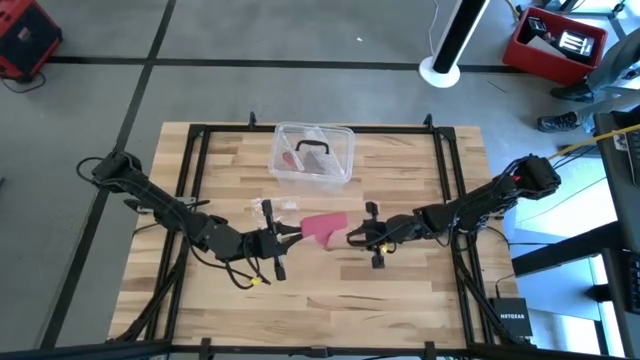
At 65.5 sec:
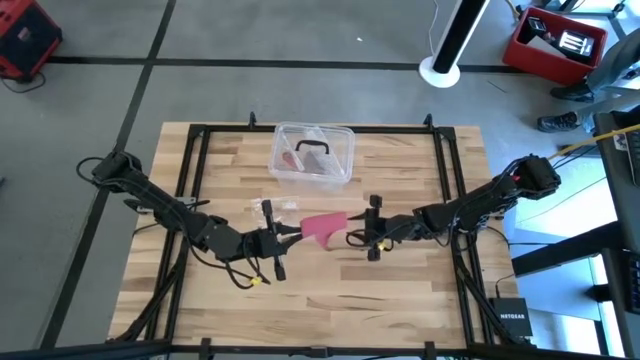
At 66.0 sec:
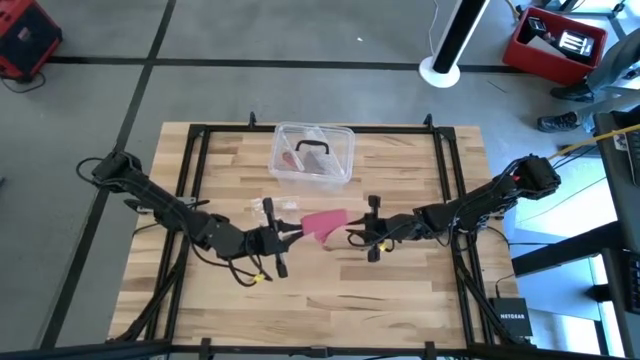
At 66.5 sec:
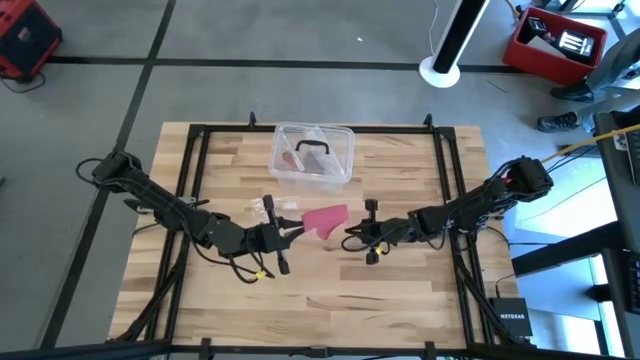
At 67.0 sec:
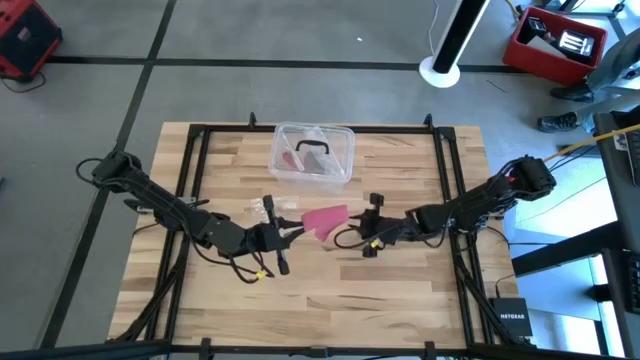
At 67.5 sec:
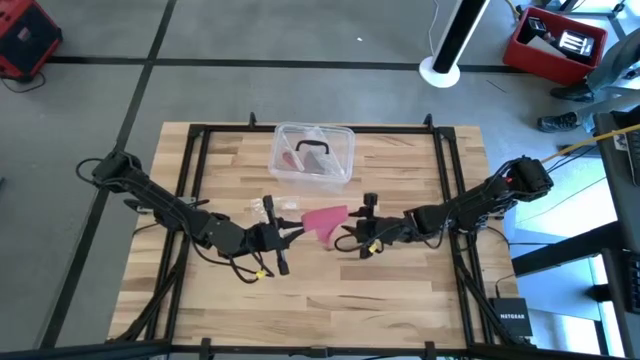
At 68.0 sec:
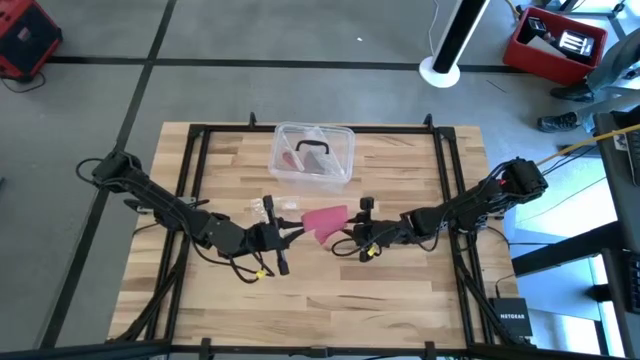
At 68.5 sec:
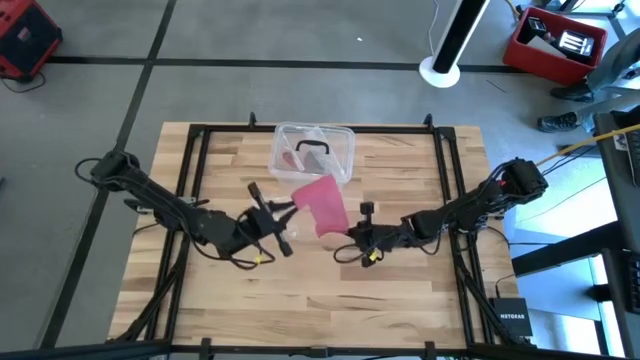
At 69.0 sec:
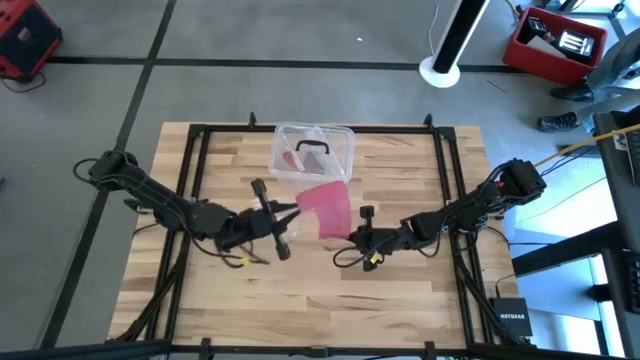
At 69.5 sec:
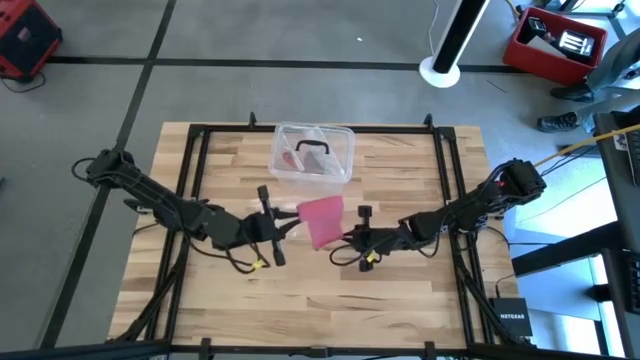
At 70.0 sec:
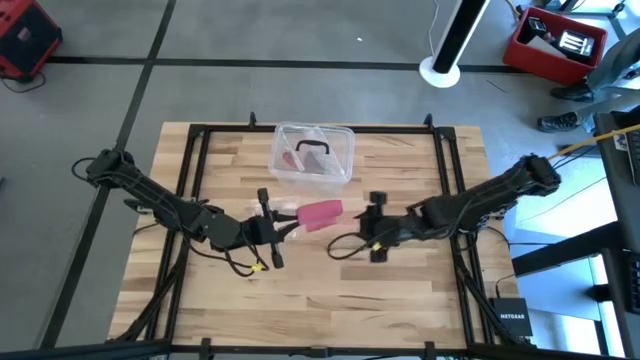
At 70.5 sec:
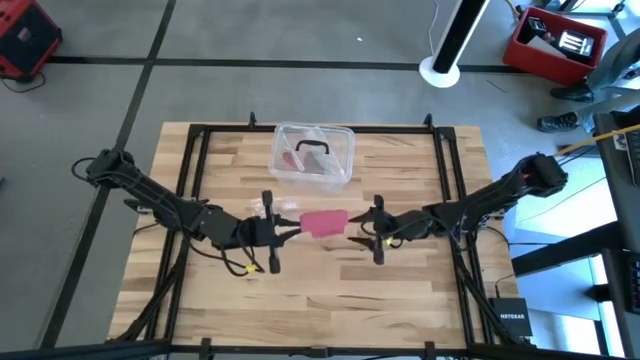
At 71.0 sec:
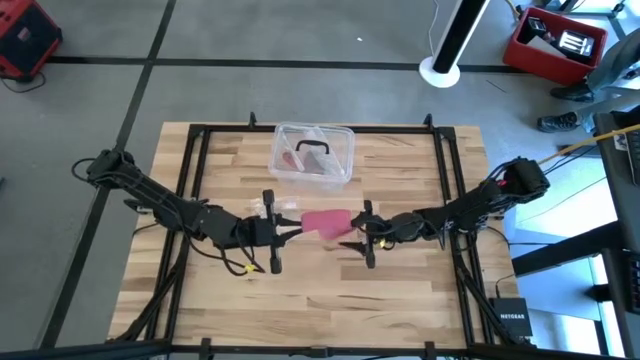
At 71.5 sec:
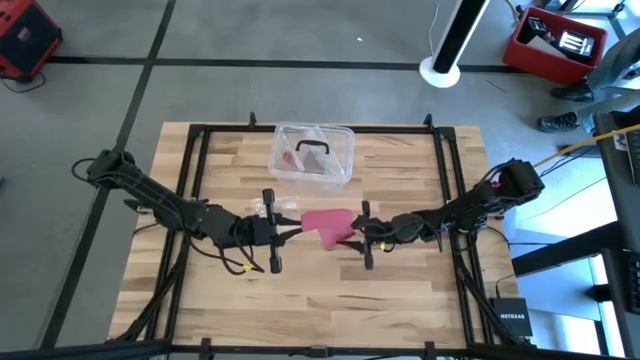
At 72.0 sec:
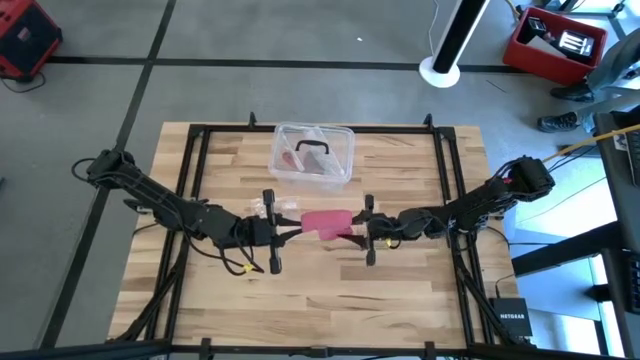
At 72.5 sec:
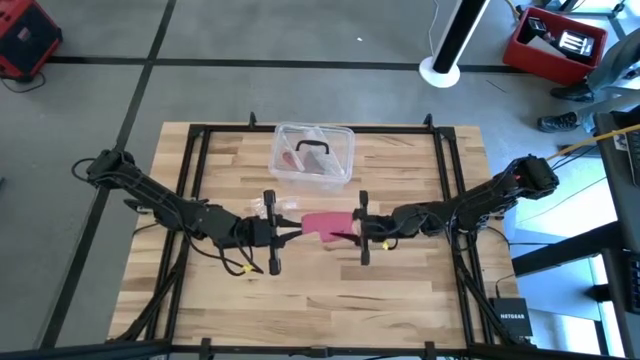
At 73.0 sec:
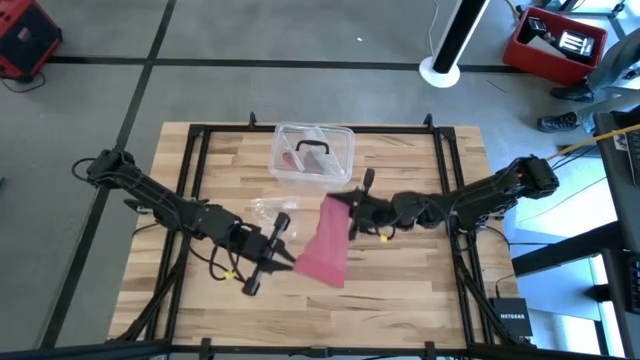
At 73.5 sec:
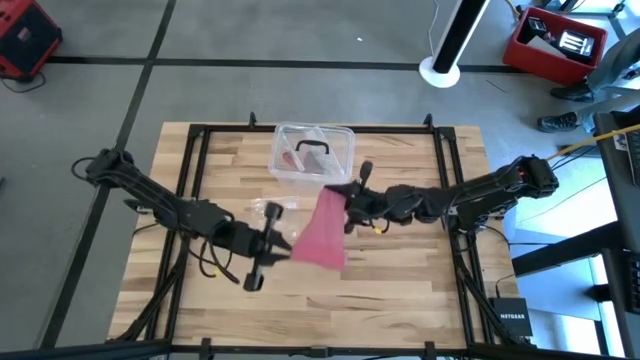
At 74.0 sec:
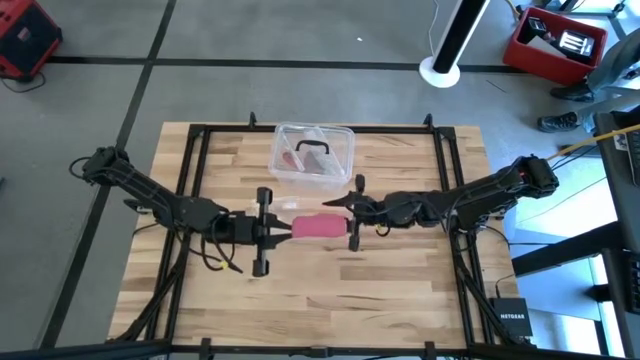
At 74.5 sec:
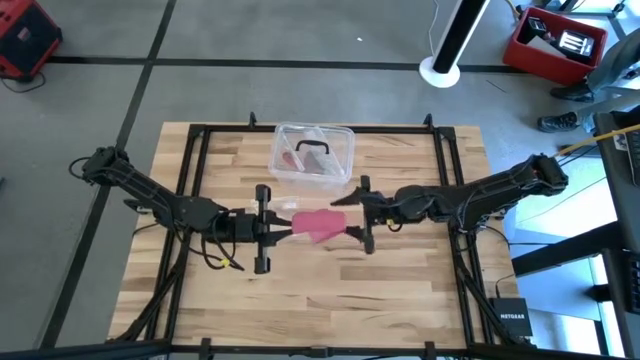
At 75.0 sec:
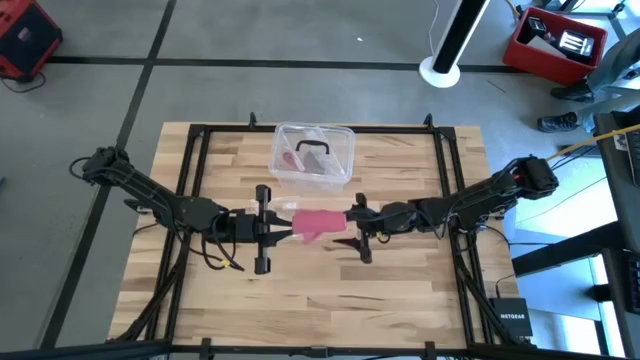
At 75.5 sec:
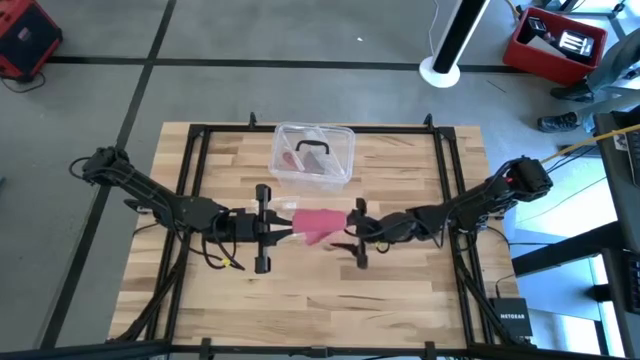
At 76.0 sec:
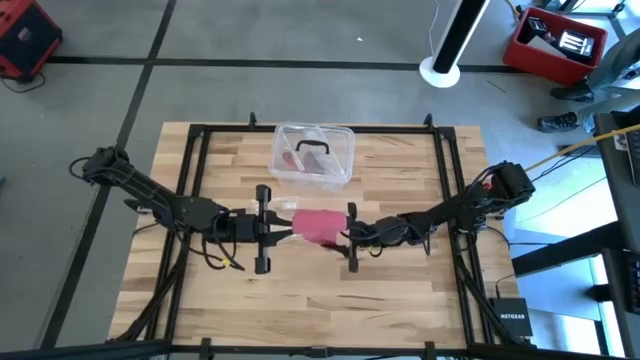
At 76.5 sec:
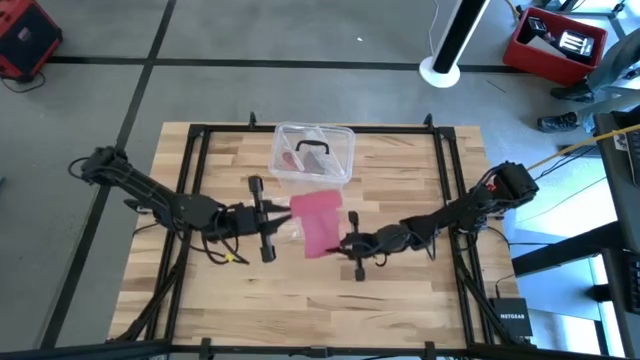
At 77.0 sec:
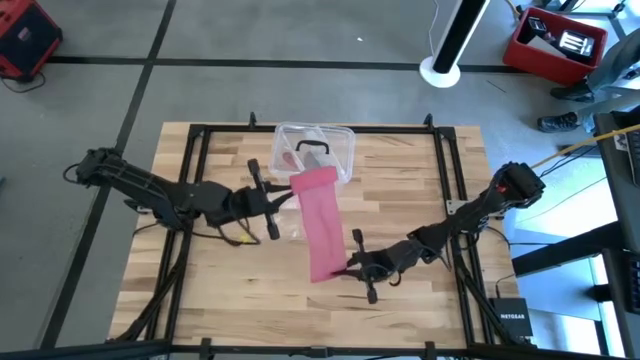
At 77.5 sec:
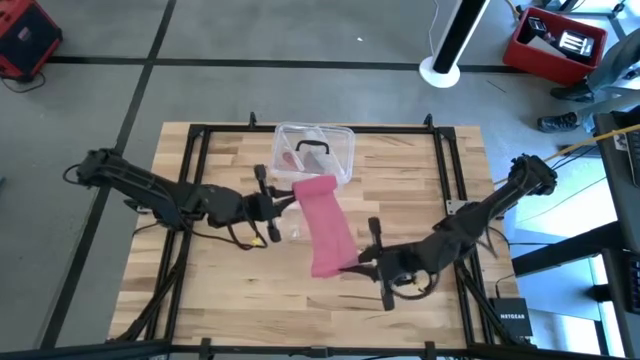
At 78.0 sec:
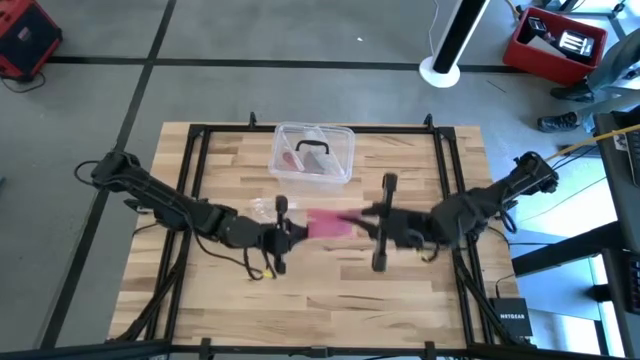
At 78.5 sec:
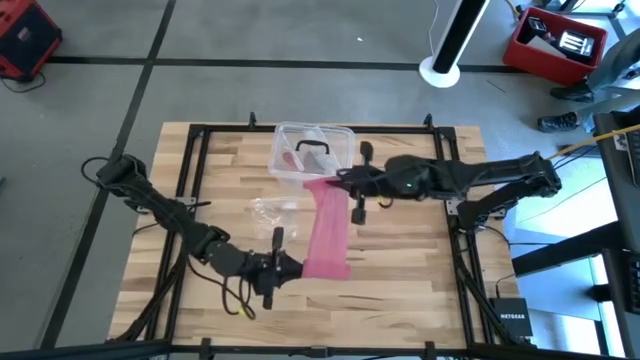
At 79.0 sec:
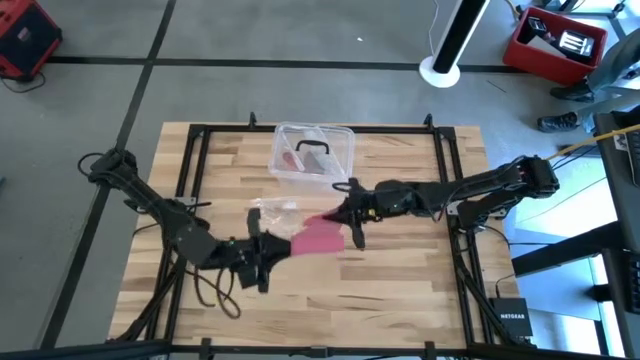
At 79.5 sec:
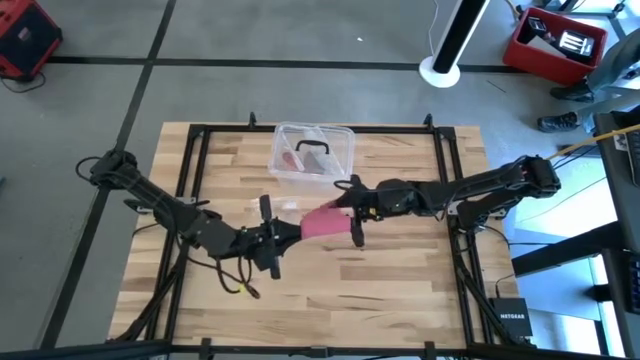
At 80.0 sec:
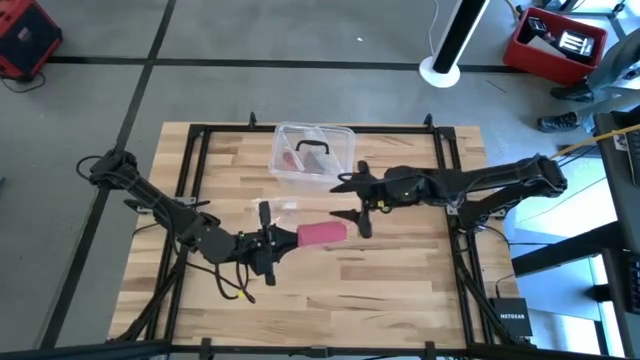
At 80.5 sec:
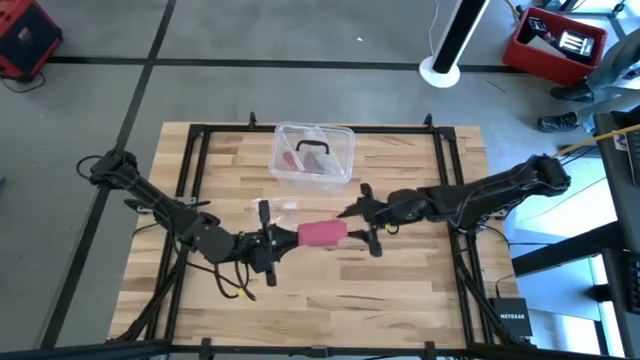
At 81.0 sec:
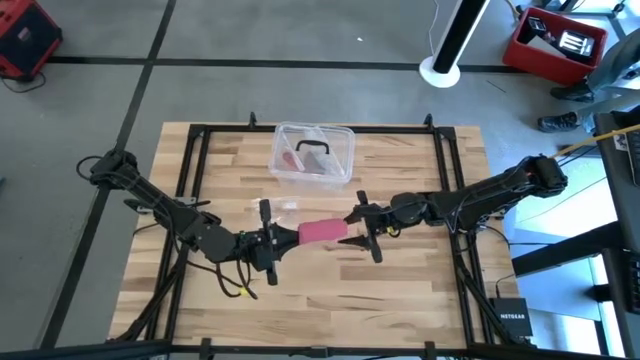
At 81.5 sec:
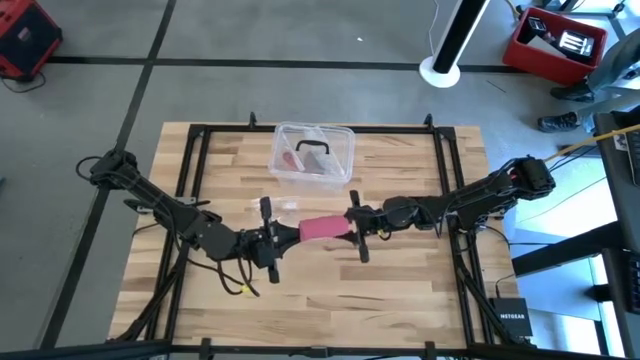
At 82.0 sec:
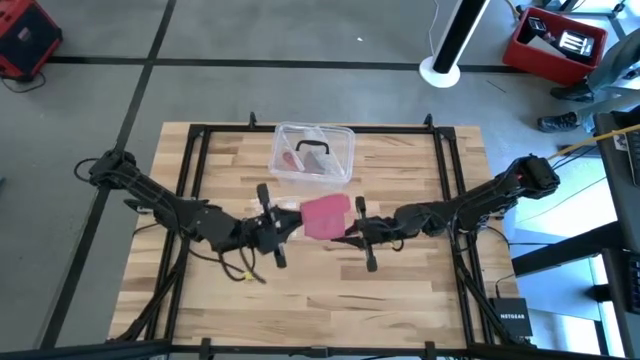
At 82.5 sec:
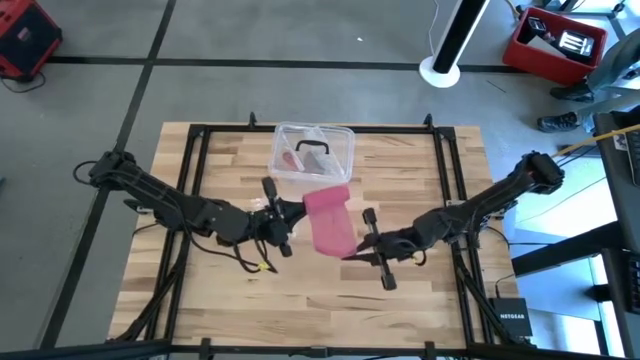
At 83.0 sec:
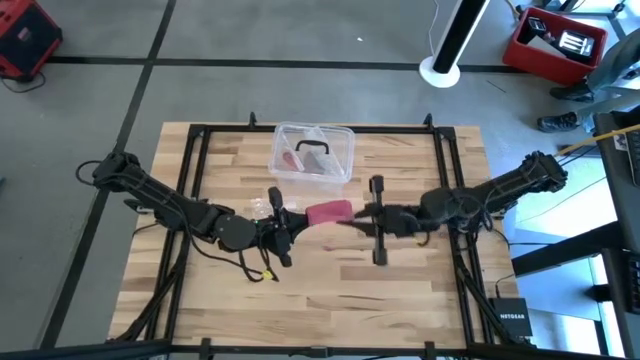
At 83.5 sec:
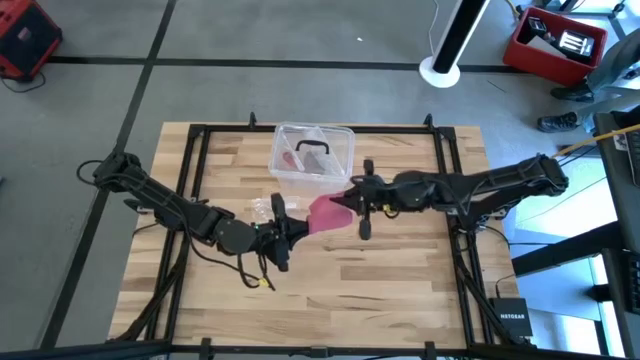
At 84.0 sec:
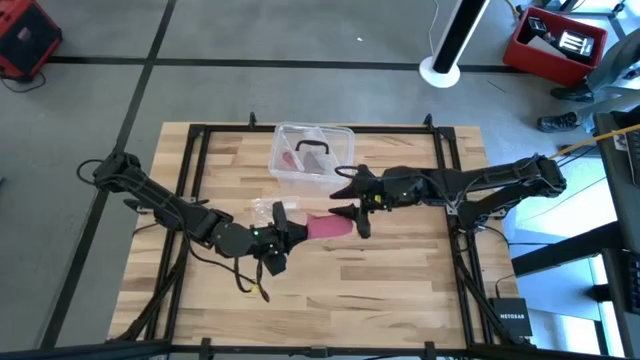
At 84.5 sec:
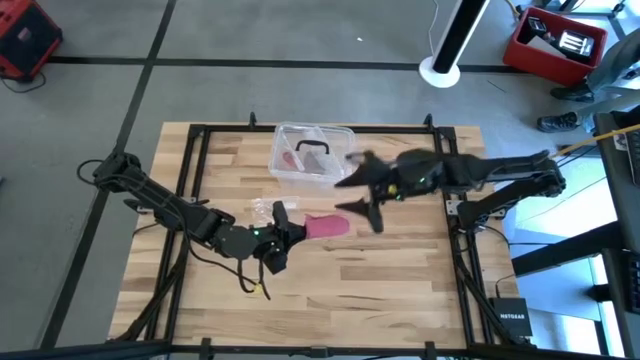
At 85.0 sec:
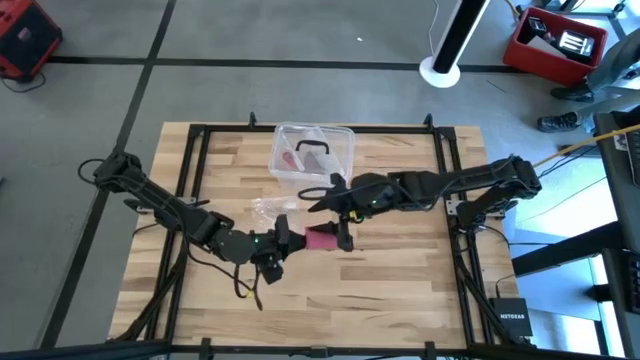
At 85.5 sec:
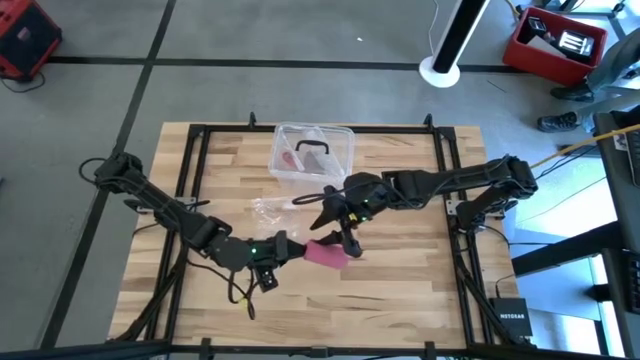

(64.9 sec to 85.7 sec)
Task: Roll bandage
Roll the pink bandage

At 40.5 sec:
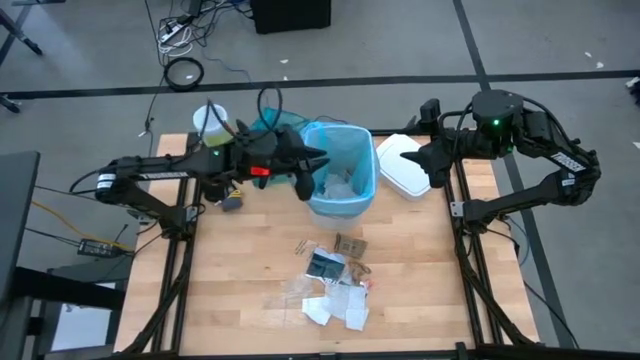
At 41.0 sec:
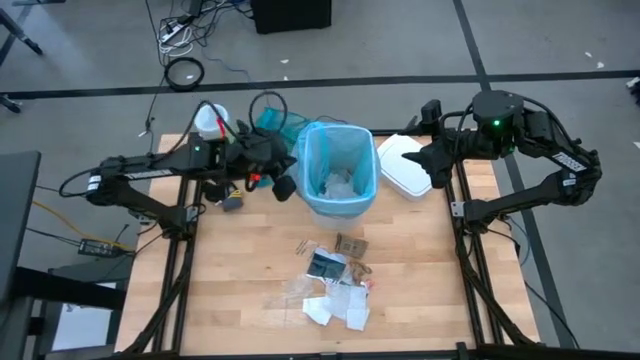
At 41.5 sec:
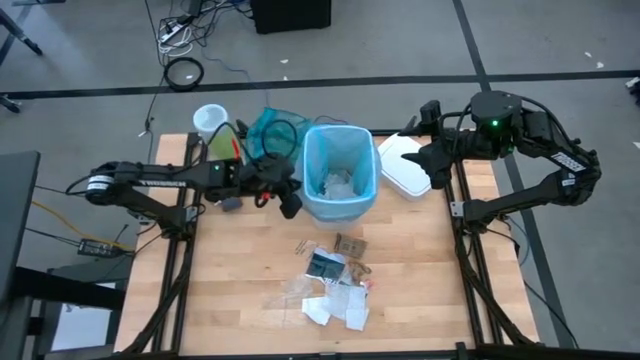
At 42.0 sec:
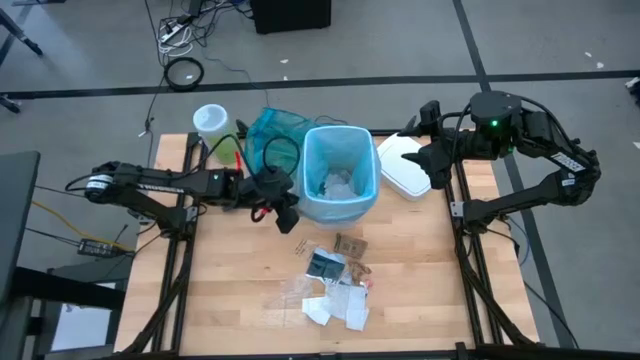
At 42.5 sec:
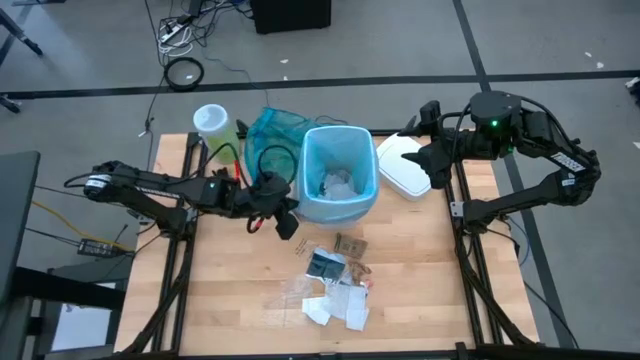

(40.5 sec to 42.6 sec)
Task: place trash/remove bag and relplace
Adjust the light blue trash bag
